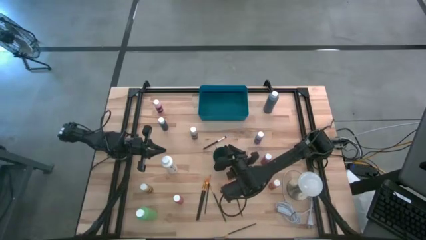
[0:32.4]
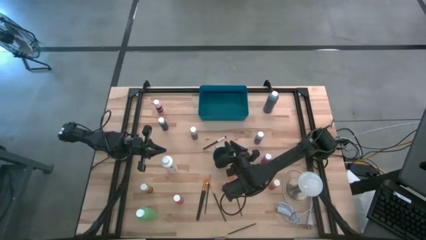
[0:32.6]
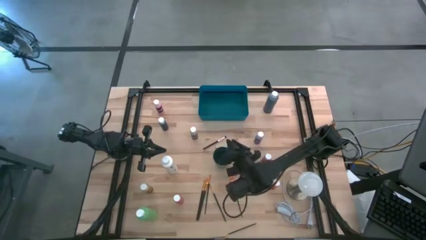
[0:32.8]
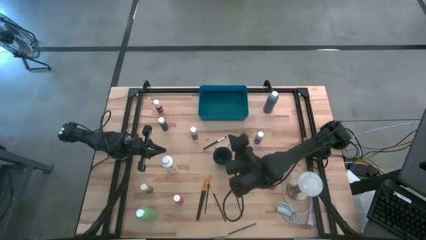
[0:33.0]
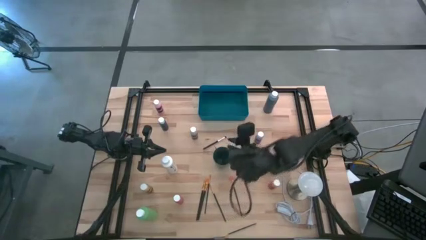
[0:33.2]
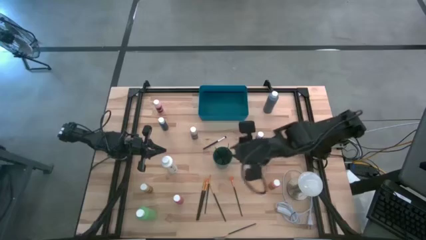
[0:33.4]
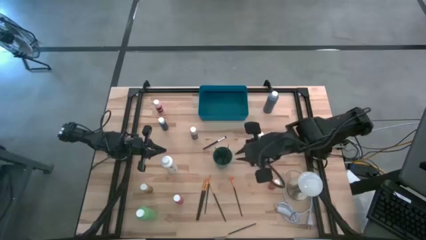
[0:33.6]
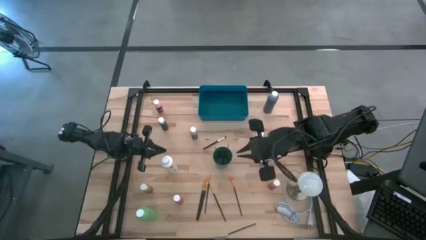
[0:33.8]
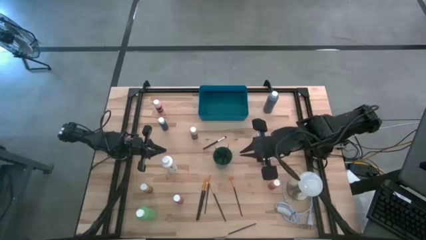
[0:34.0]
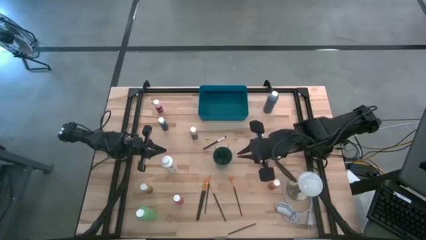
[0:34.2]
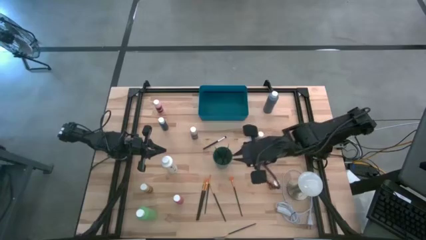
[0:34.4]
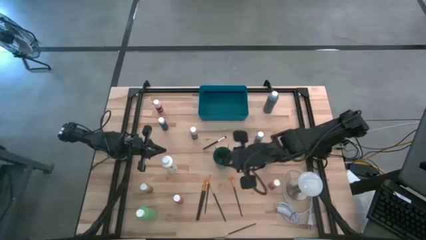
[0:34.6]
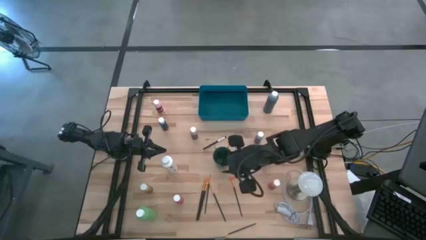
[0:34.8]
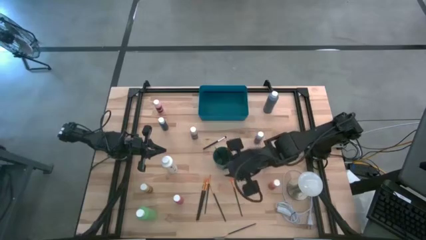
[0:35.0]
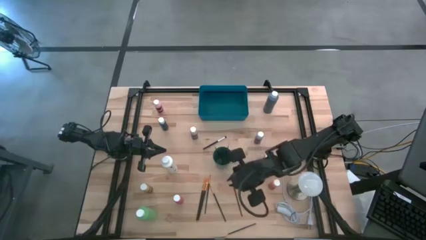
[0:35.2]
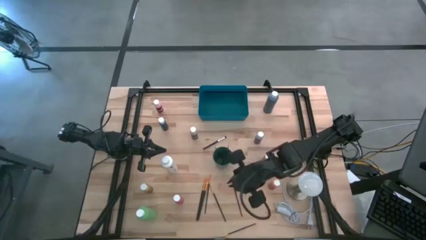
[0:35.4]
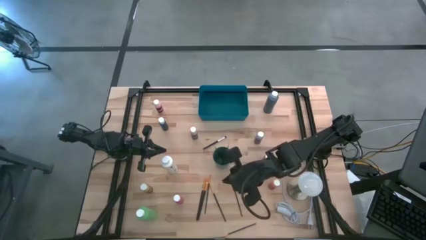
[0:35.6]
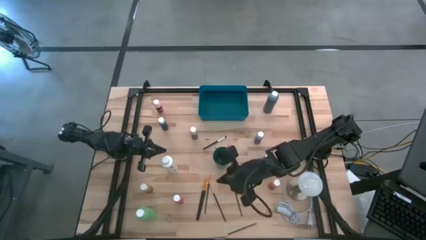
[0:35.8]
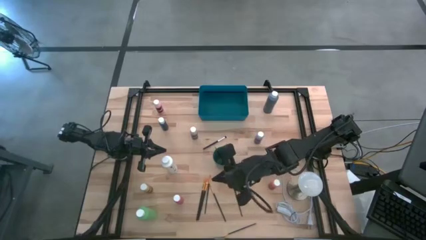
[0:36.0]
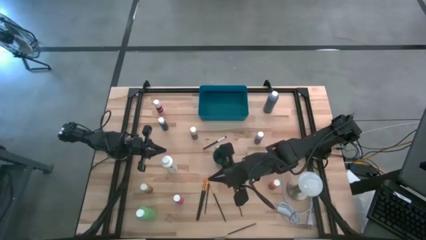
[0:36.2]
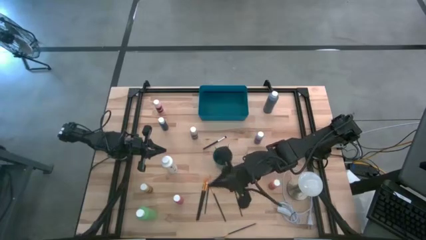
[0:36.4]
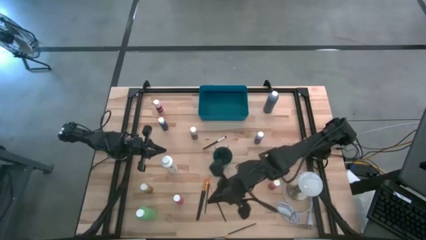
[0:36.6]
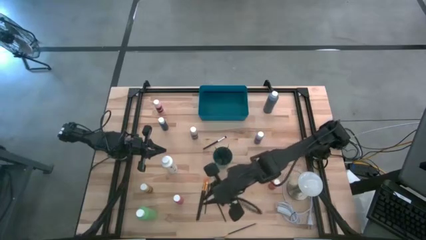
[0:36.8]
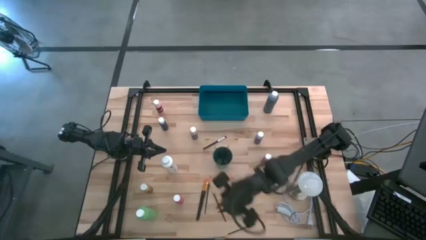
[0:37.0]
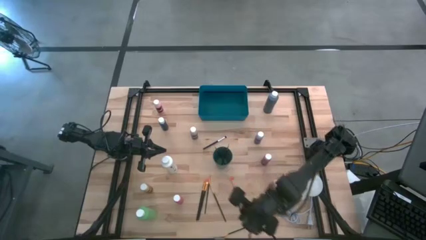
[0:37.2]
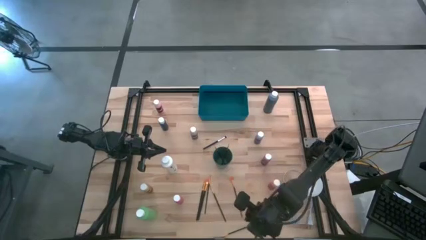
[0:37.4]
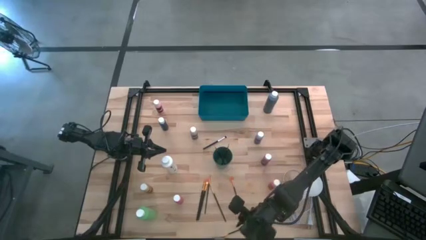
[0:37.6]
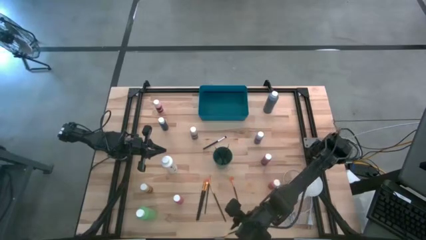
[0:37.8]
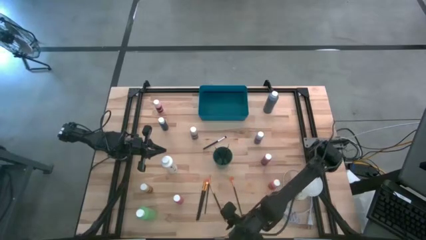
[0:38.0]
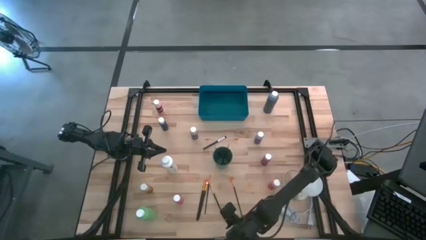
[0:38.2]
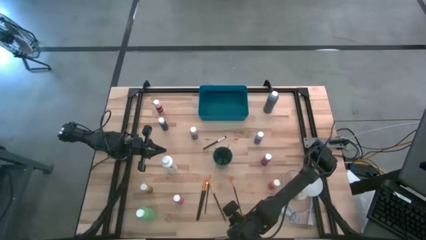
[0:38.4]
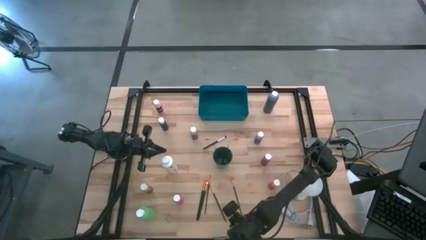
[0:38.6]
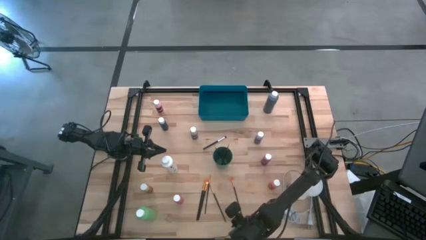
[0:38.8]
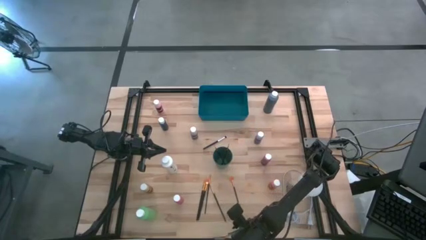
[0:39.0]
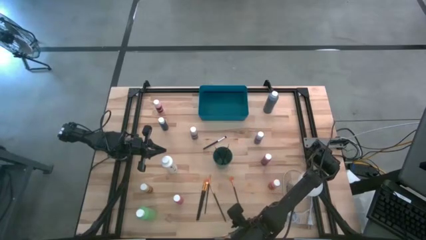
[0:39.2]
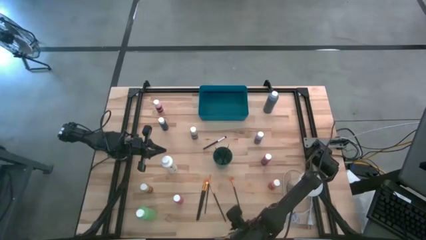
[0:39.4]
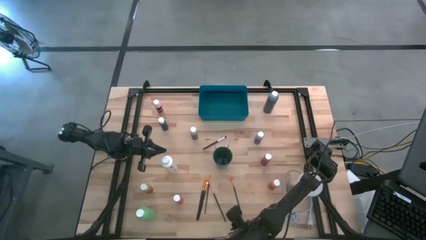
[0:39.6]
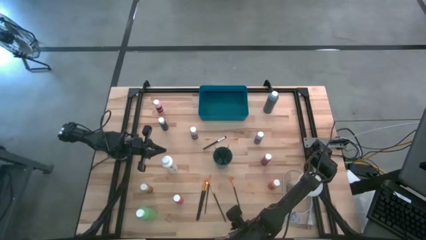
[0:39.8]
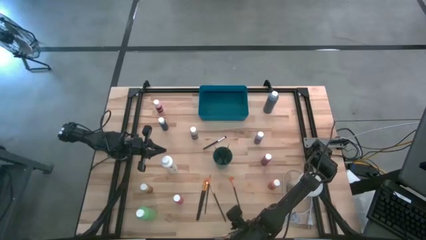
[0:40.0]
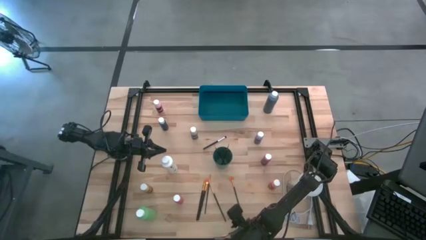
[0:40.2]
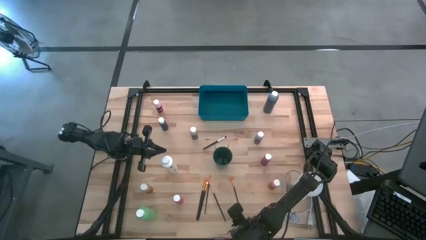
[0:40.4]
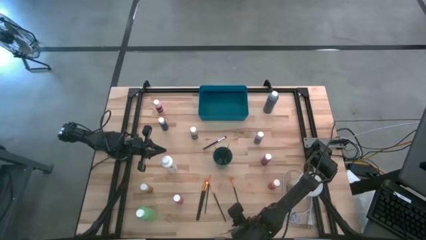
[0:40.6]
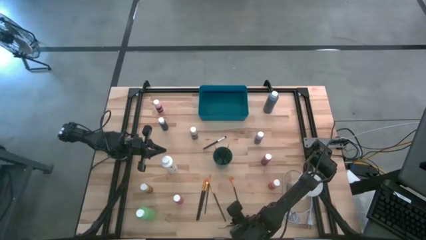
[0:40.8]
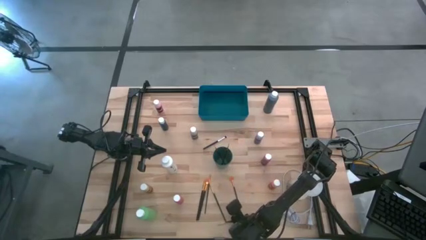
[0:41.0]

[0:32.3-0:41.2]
Task: Pick & Place Paint Supplies
Put the yellow paint brush into the green cup

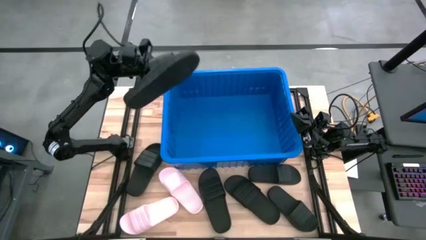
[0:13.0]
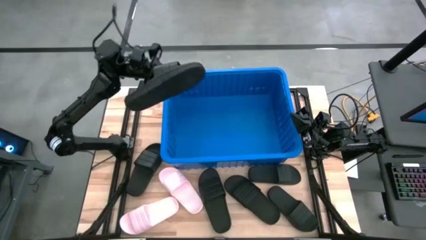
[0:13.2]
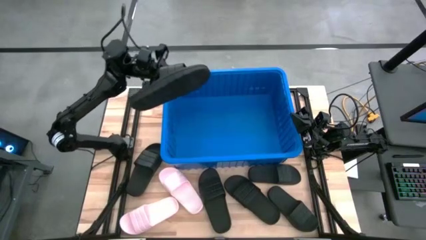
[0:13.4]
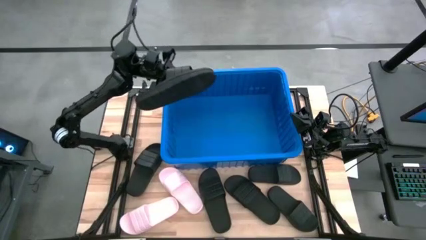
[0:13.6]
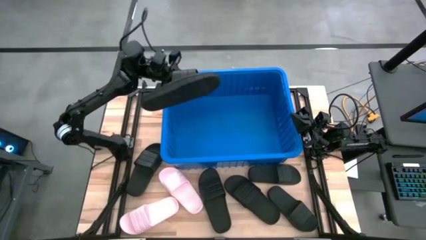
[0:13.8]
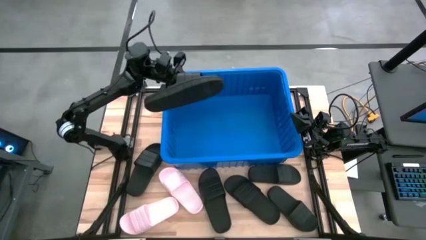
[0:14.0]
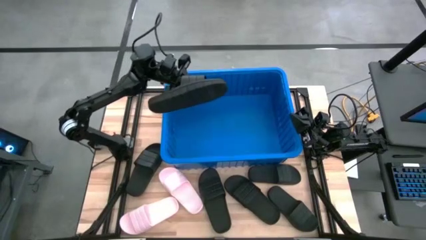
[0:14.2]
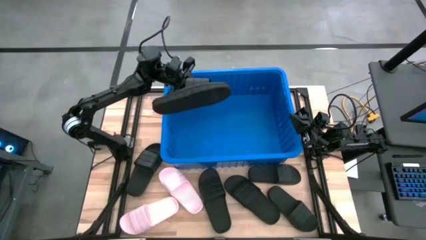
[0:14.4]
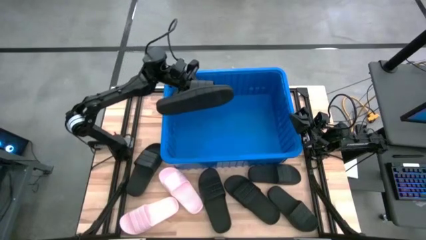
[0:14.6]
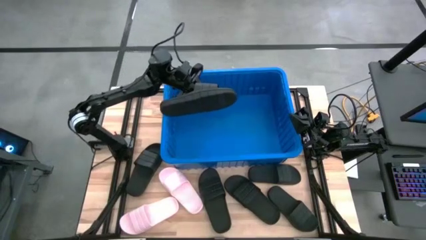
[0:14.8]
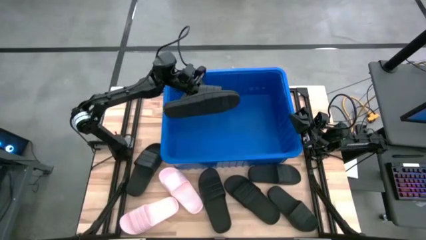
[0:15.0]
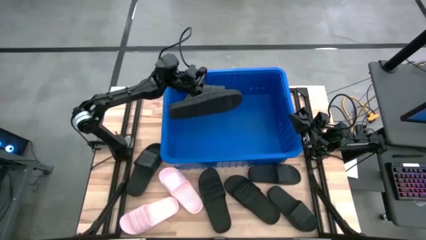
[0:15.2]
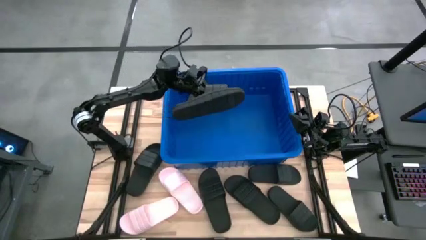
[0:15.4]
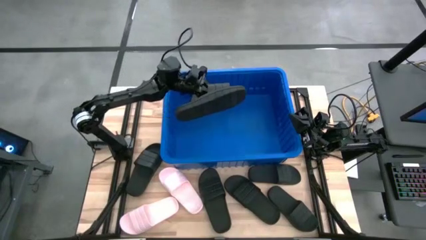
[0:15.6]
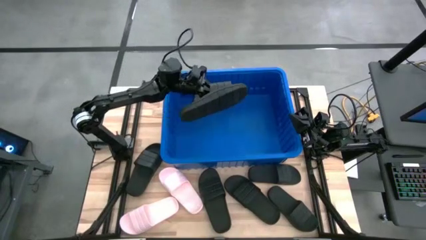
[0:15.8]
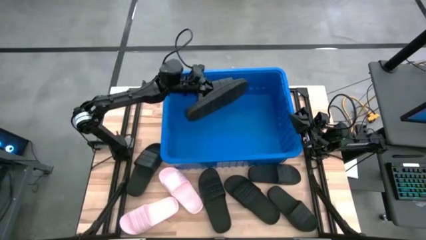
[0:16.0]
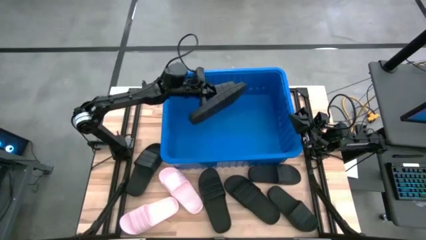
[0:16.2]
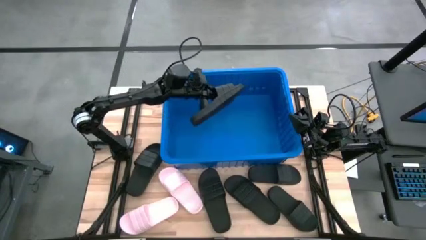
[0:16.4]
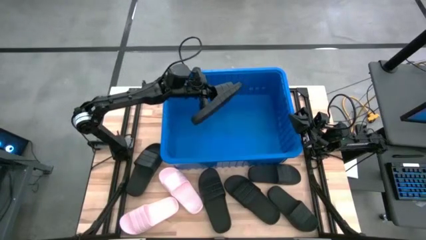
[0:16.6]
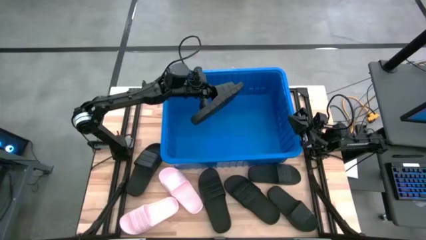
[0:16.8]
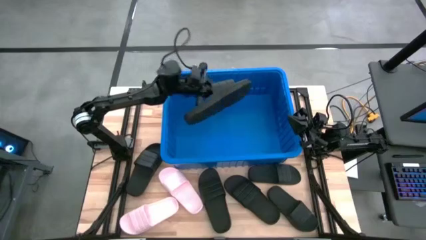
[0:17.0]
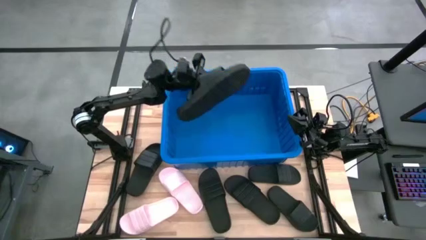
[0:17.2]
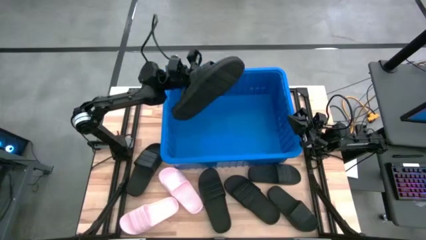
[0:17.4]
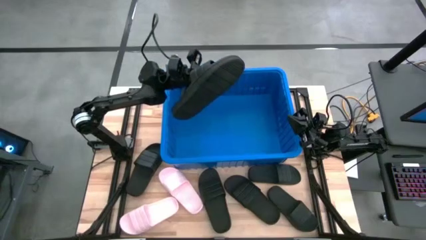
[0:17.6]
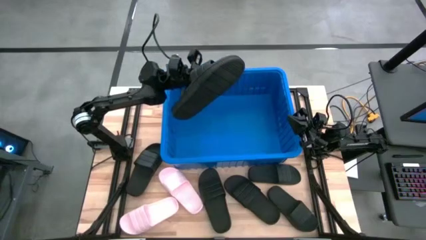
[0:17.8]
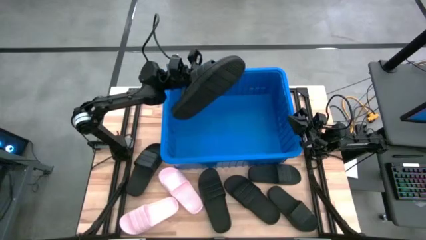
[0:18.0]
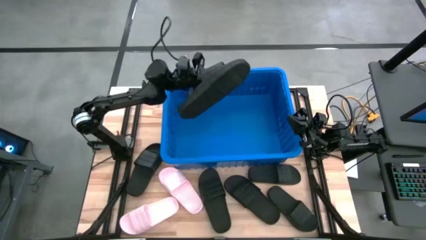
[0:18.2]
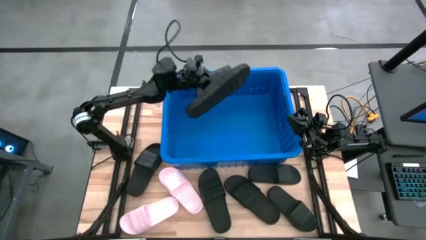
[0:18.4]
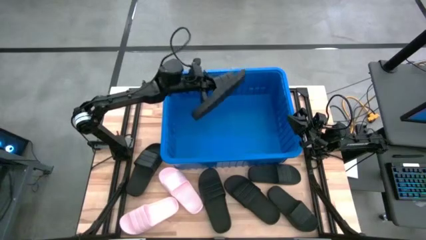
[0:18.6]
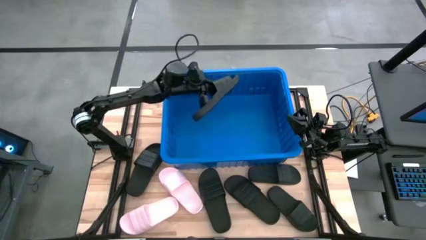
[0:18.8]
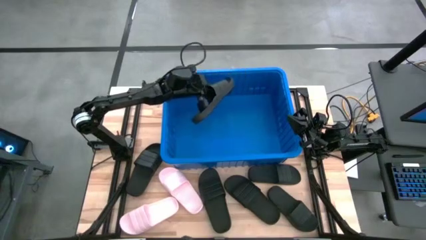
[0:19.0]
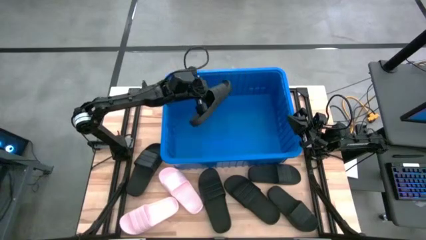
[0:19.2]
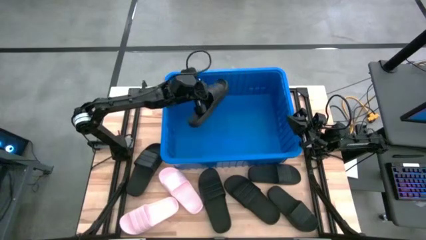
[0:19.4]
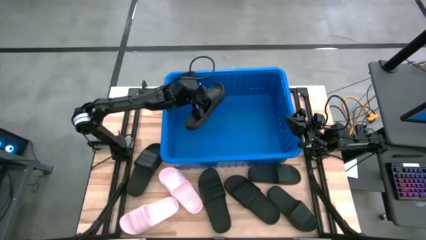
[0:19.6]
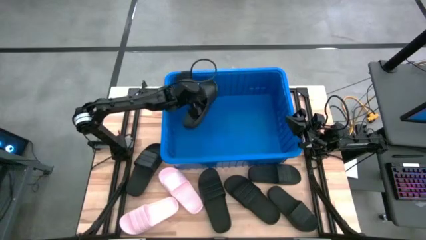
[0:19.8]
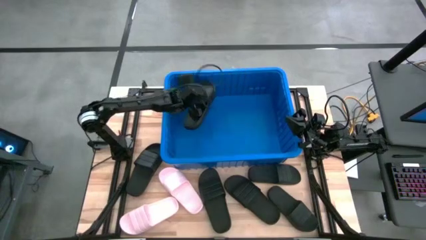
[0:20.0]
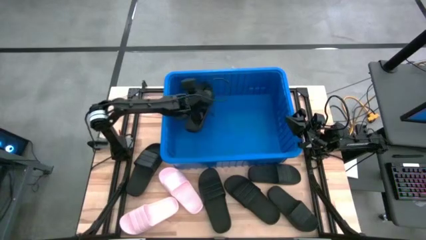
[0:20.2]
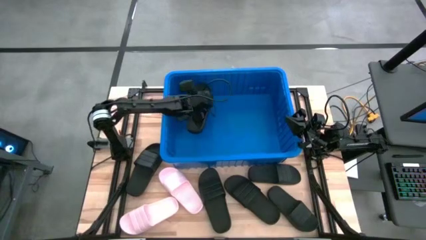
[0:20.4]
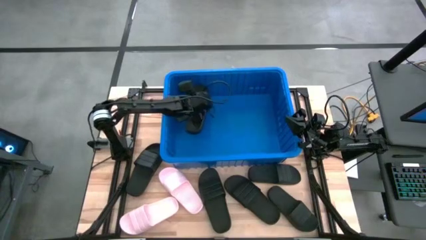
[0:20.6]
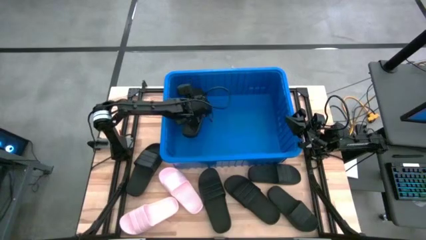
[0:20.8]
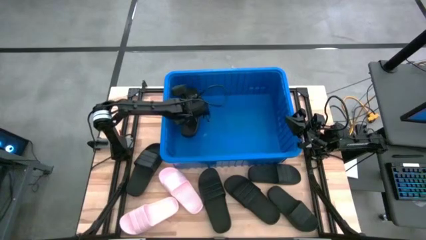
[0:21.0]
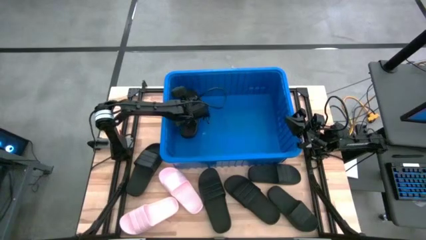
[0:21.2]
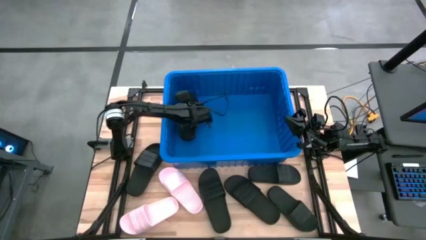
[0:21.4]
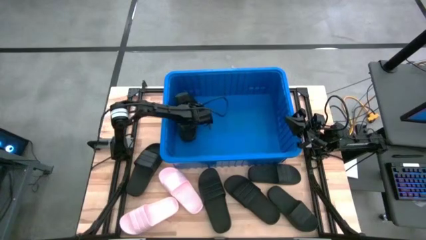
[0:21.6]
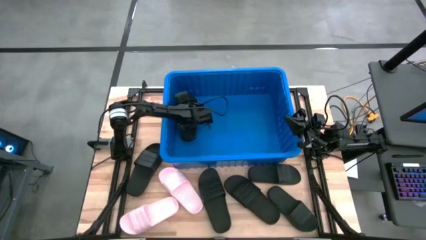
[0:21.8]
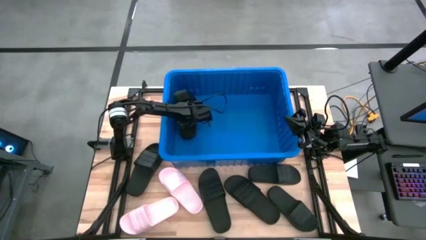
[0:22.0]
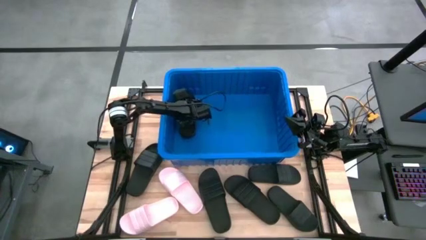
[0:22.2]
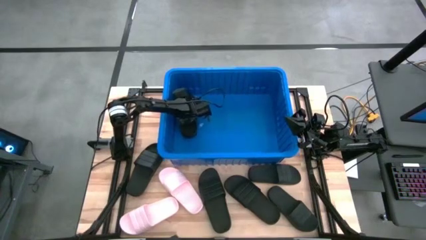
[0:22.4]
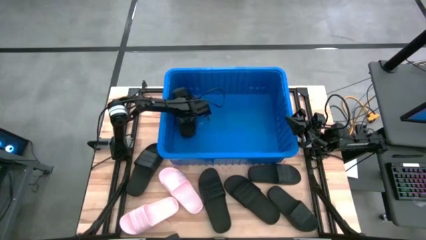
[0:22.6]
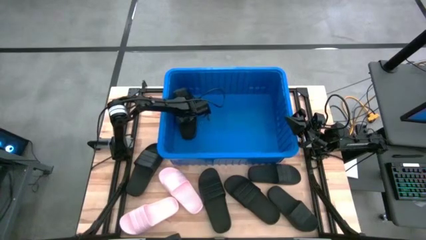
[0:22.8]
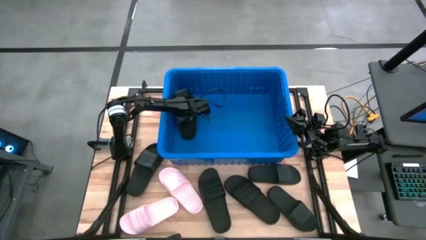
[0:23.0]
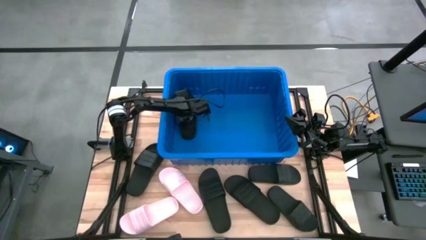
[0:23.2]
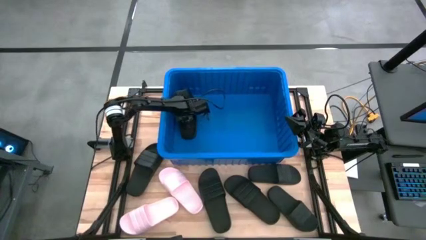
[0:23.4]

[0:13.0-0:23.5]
Task: Pick and place slides into bin
Put the black slide into the blue bin
